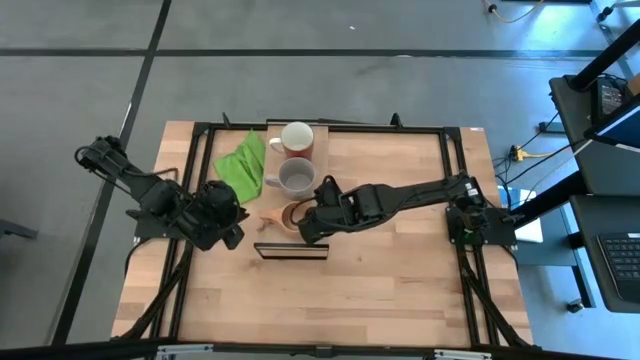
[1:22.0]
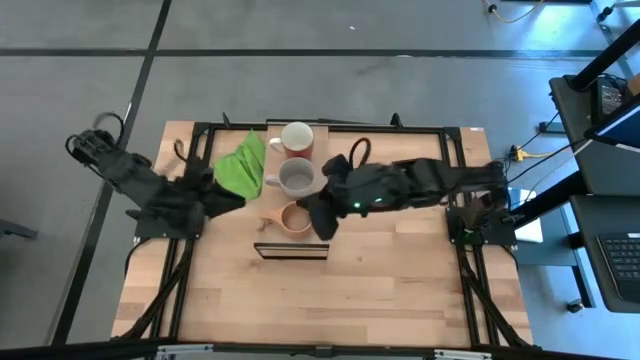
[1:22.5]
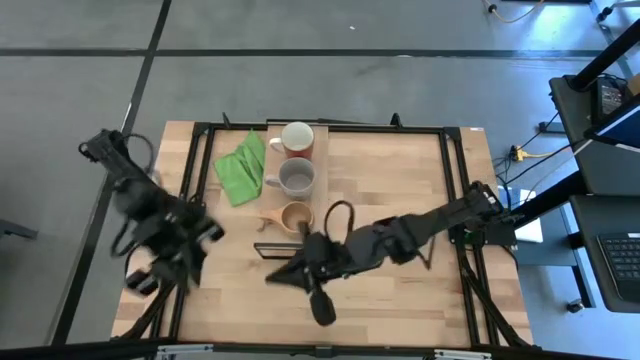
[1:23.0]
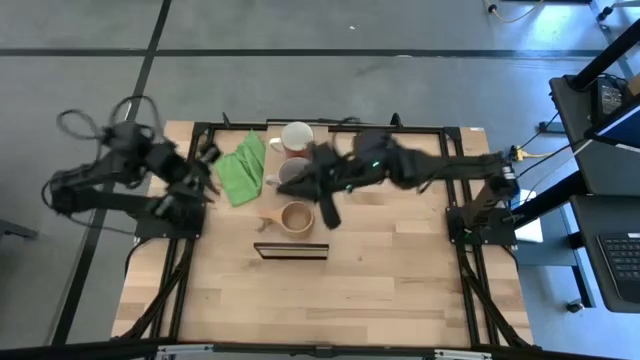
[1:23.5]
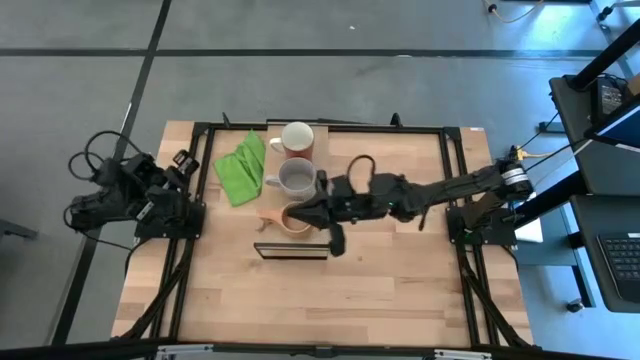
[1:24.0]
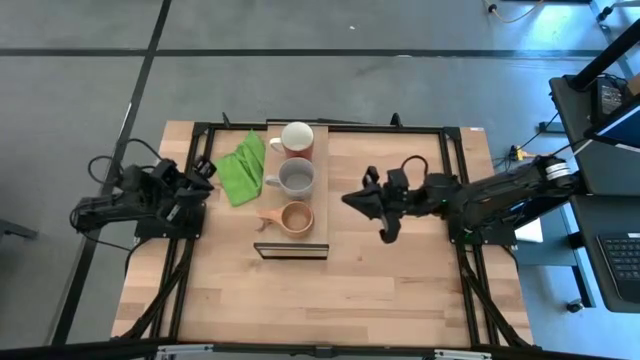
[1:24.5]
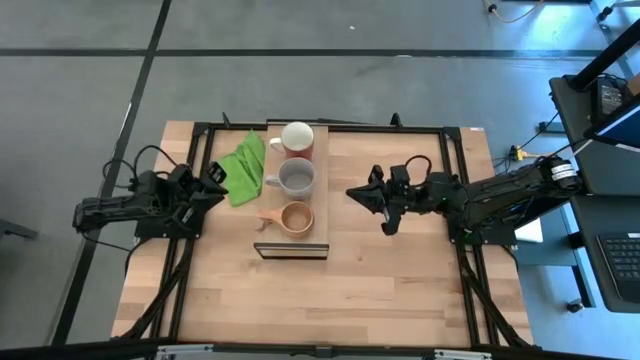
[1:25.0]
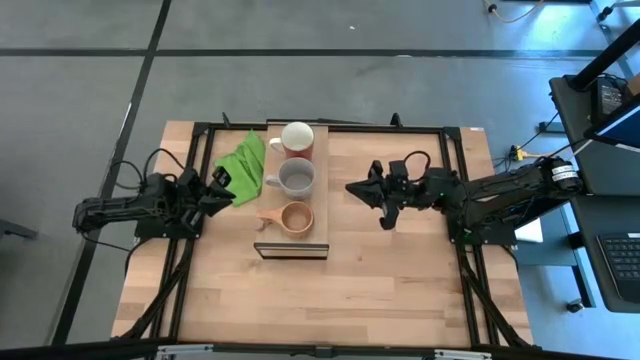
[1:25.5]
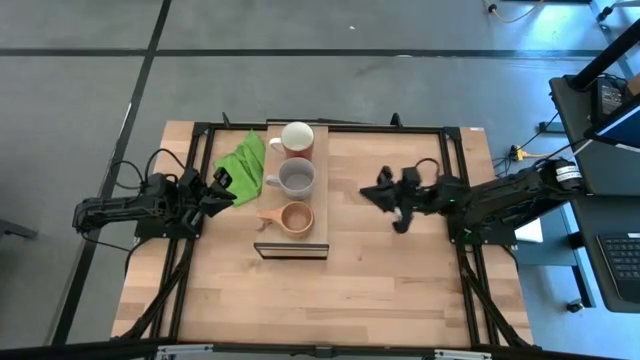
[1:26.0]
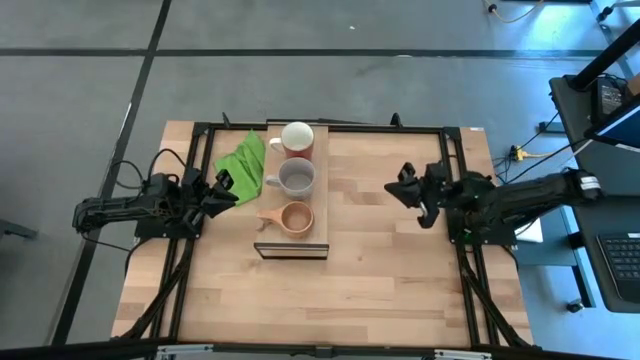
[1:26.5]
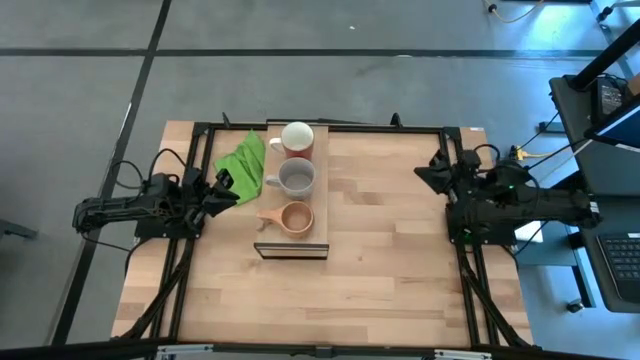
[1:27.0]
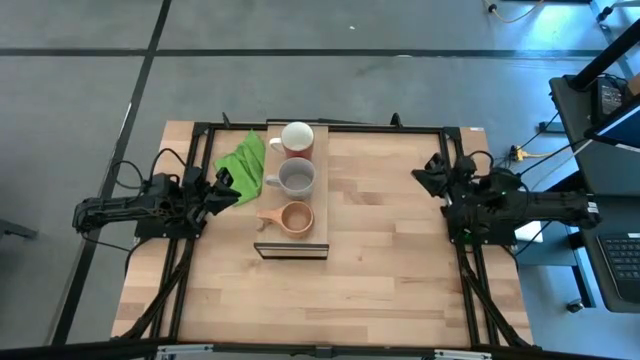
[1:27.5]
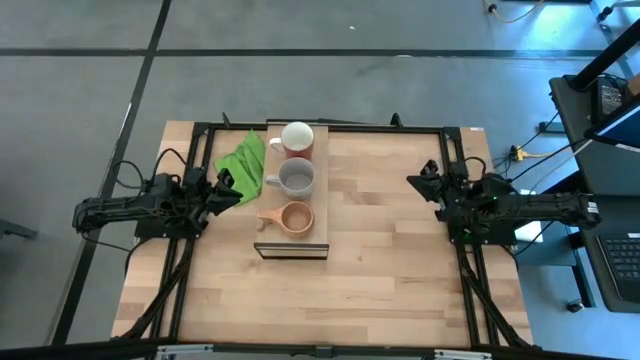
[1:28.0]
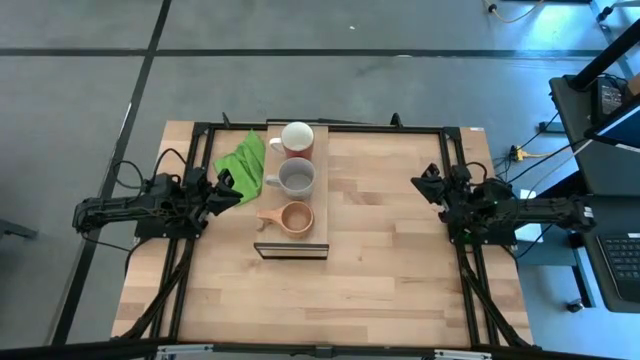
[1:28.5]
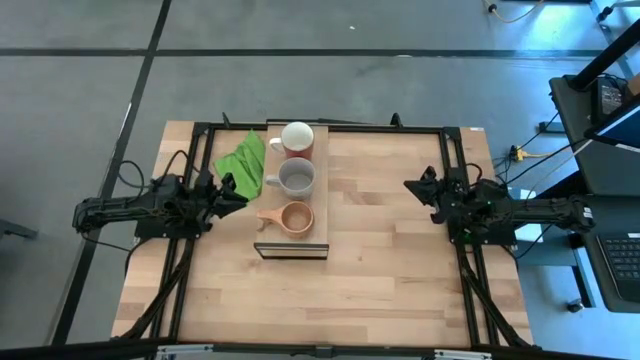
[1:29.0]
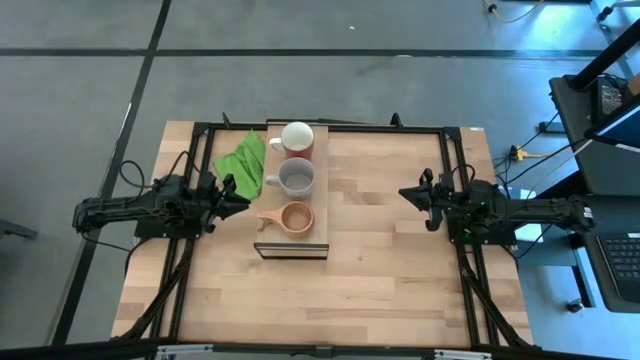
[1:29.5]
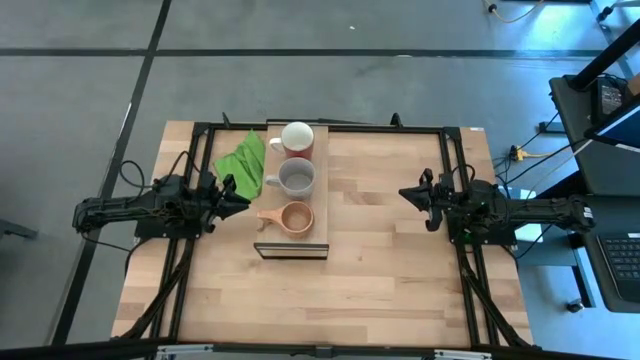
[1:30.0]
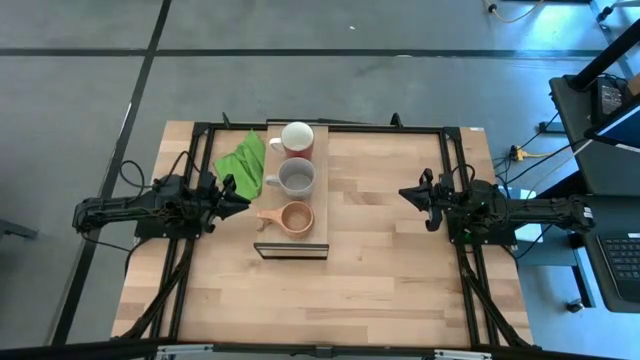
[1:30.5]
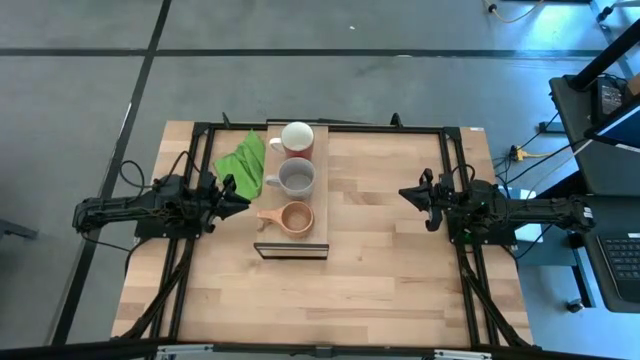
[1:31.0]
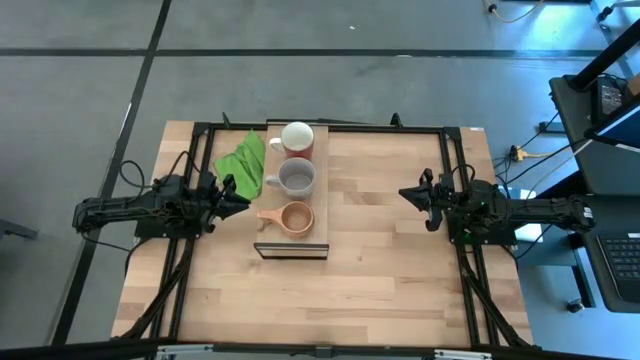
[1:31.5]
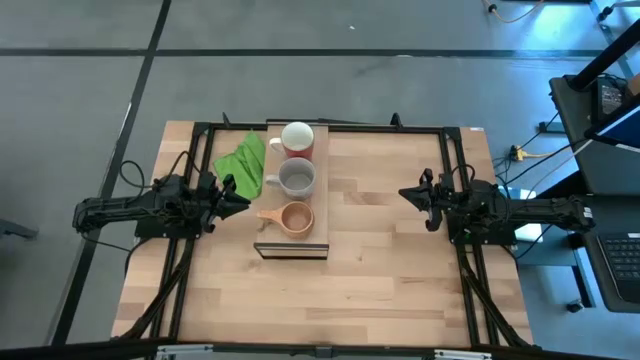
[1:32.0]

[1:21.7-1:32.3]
Task: Stack small to large cups/mugs on shelf
Return to Home Position

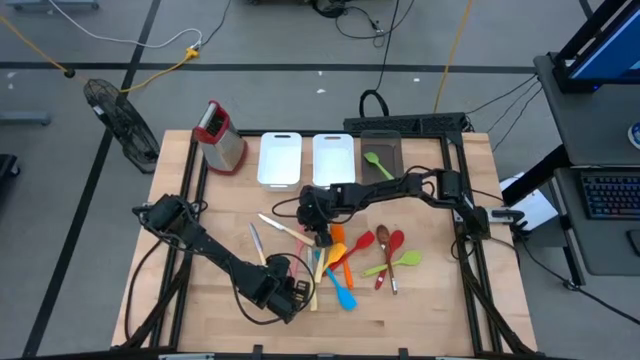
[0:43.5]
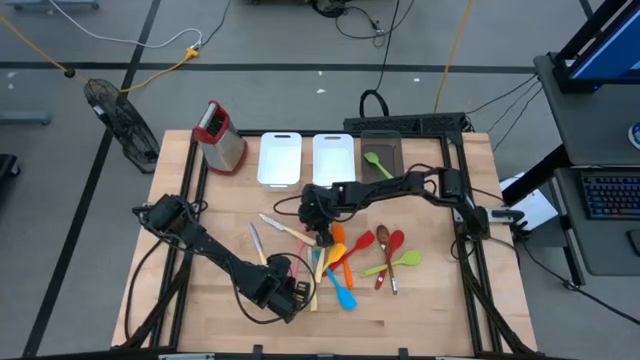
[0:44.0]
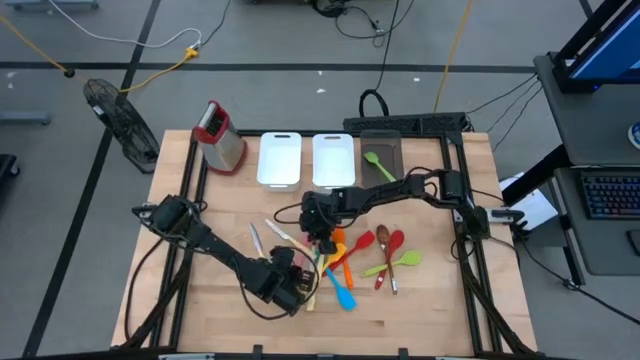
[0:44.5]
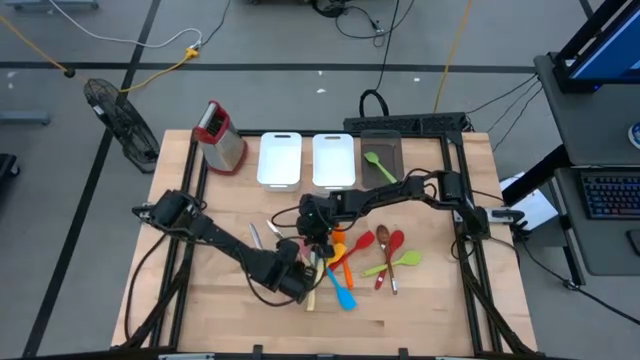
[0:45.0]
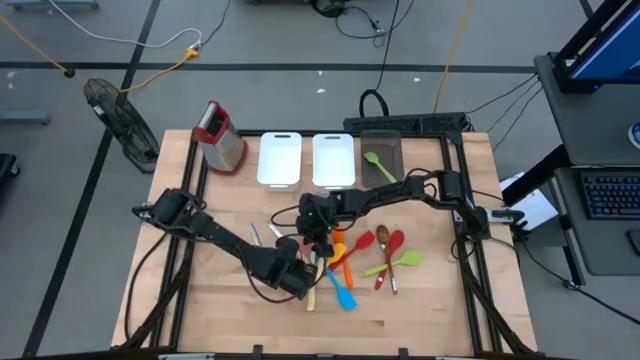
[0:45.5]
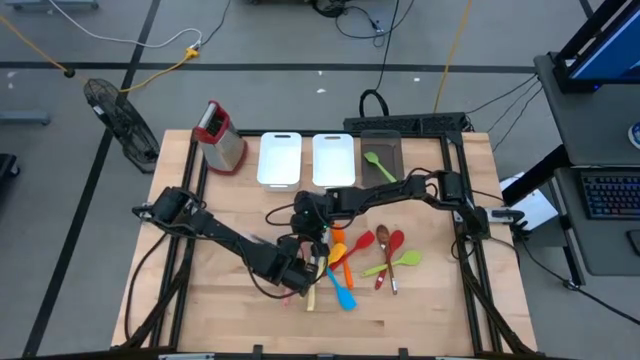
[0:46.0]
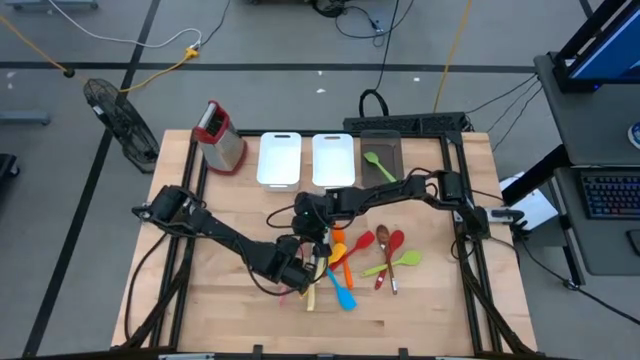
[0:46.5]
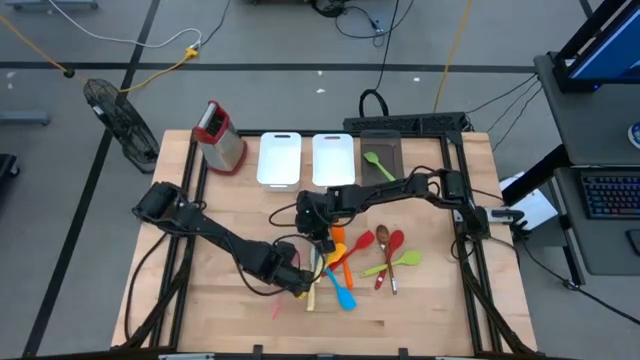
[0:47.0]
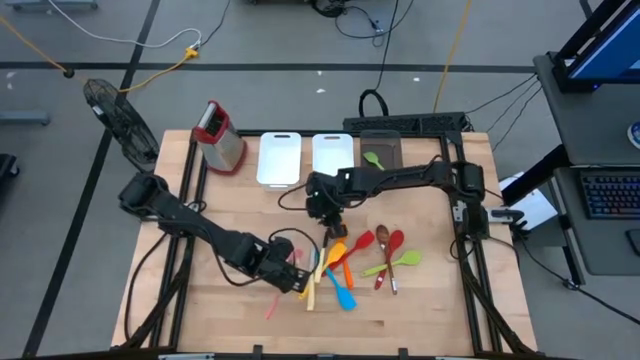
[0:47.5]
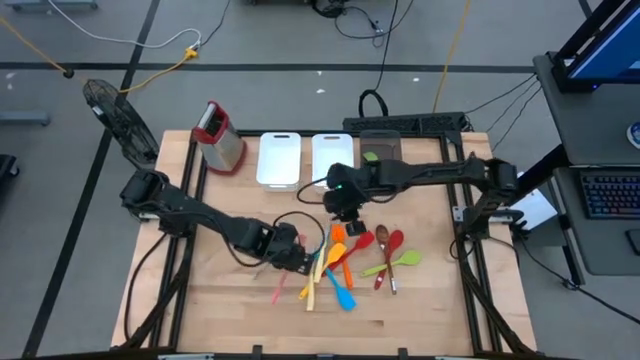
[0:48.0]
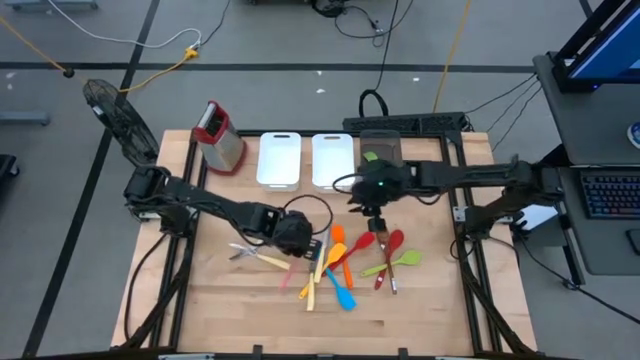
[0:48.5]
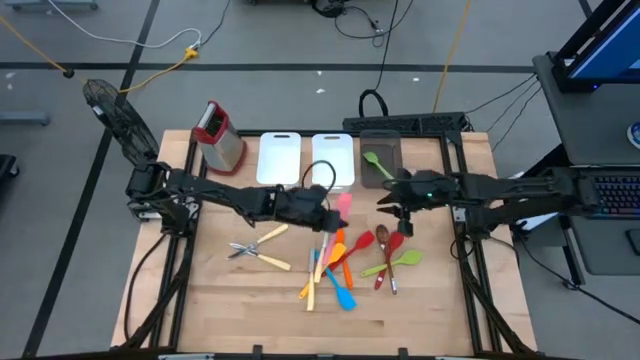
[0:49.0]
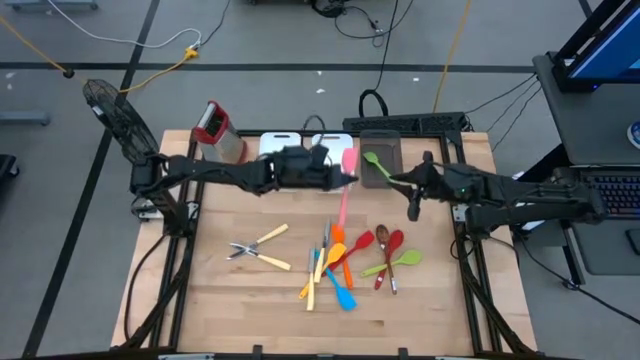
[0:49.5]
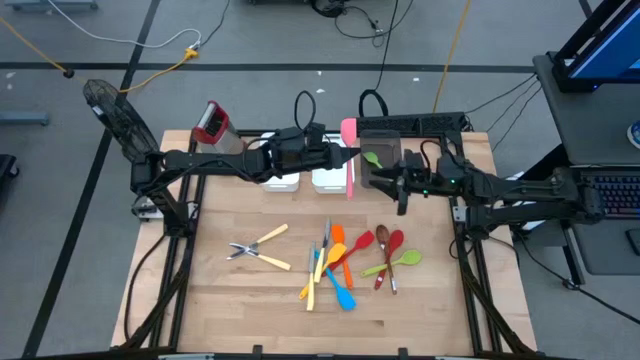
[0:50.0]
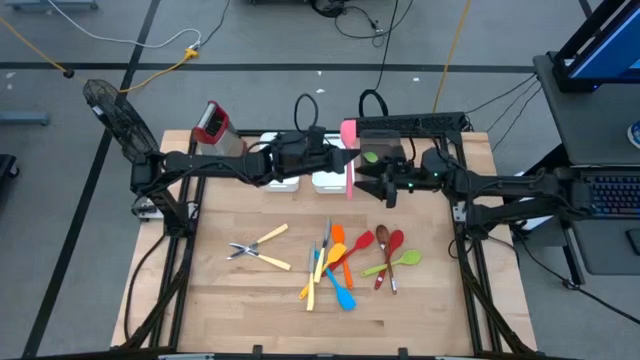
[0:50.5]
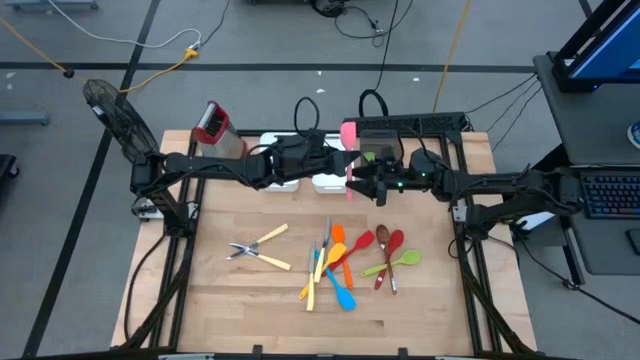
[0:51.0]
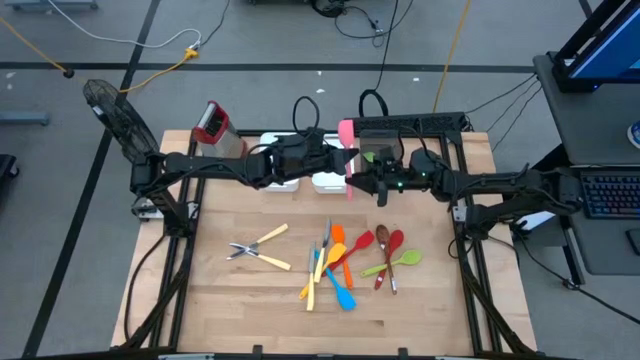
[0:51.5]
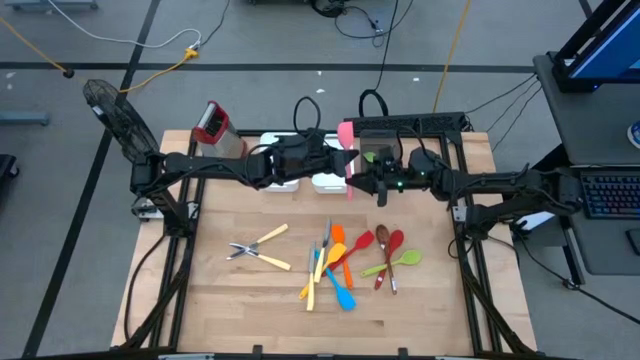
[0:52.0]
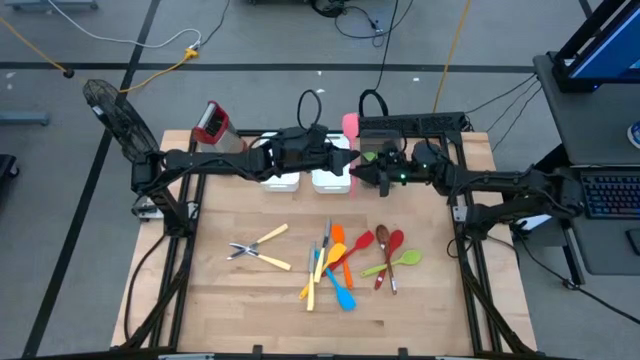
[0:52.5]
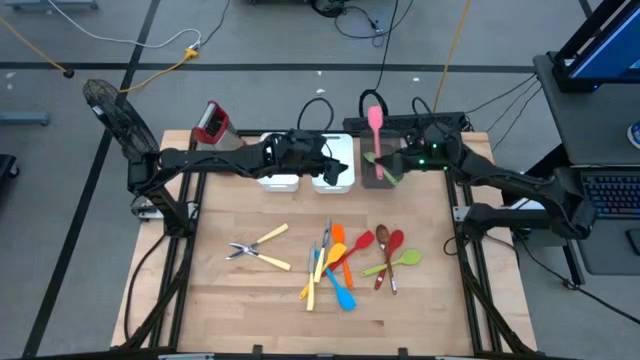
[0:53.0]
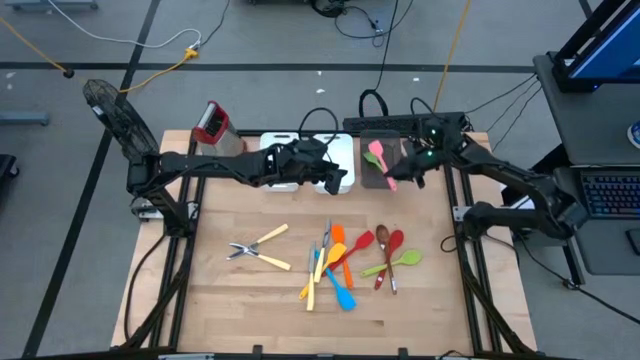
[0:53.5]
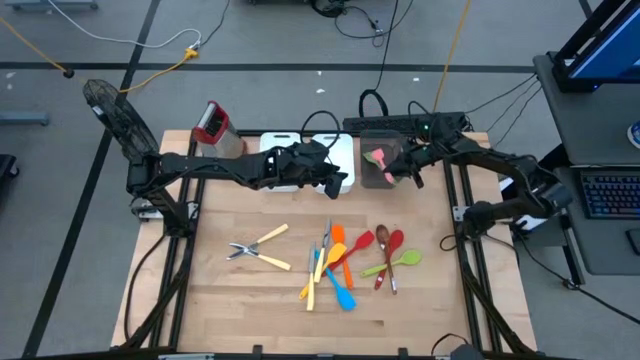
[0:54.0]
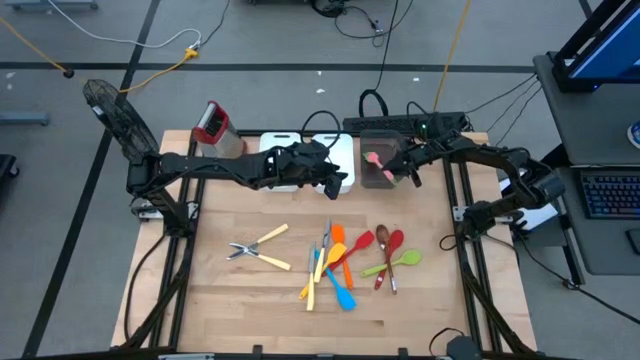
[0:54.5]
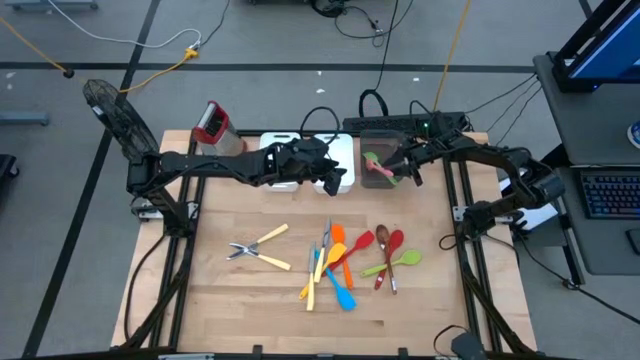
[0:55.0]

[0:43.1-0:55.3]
Task: Pick & Place Kitchen Items
Put the pink spatula into the black bin
